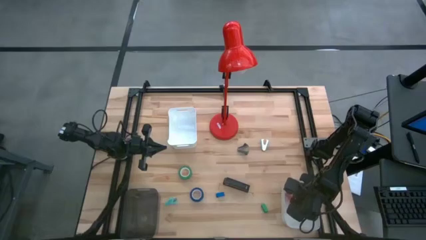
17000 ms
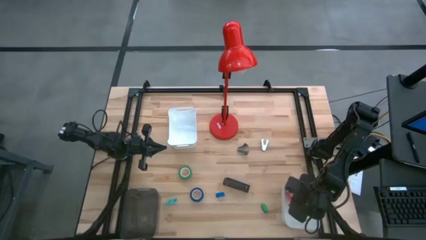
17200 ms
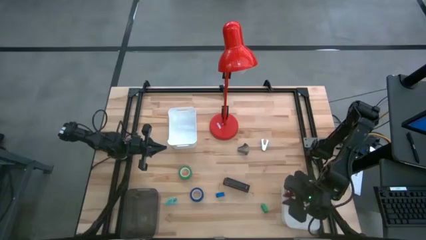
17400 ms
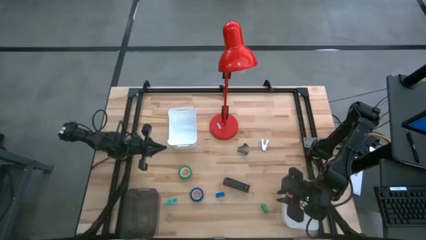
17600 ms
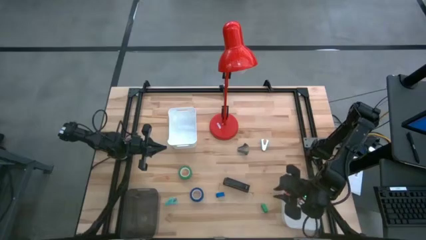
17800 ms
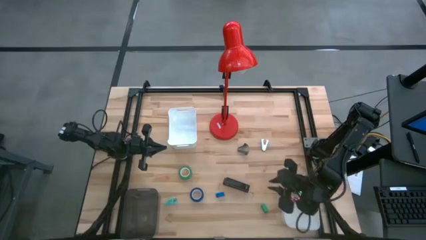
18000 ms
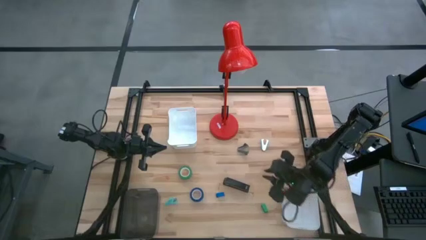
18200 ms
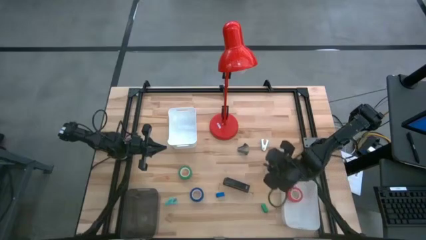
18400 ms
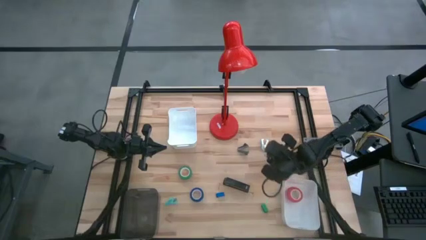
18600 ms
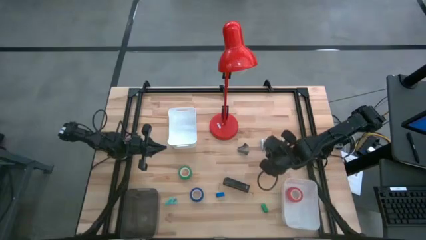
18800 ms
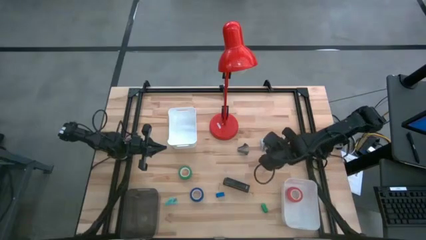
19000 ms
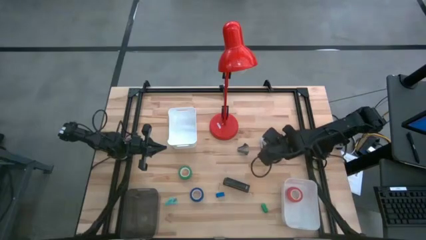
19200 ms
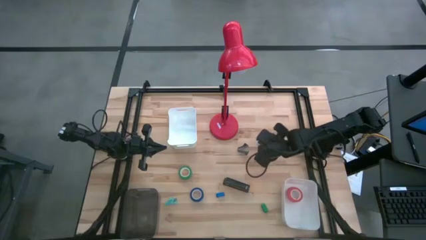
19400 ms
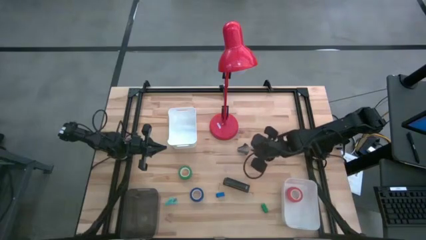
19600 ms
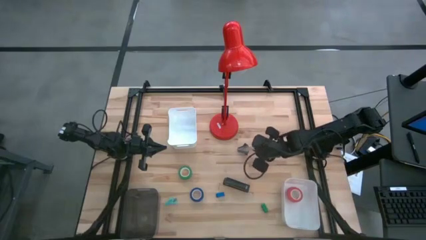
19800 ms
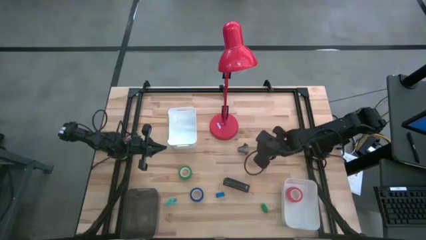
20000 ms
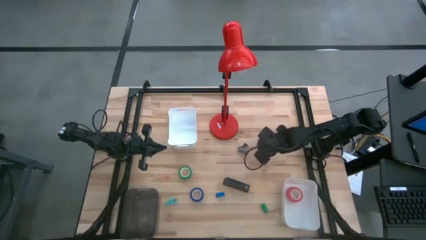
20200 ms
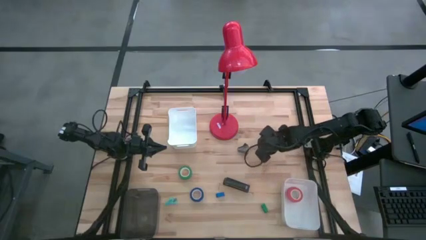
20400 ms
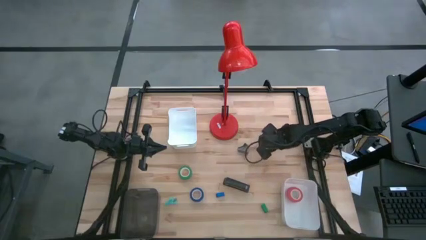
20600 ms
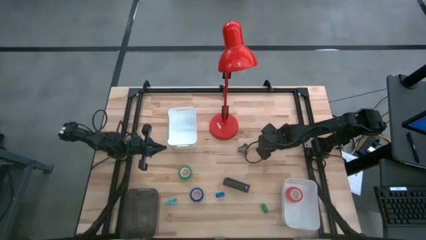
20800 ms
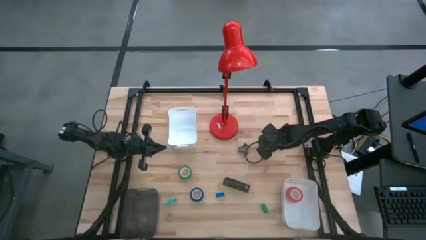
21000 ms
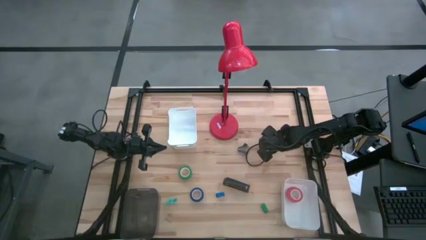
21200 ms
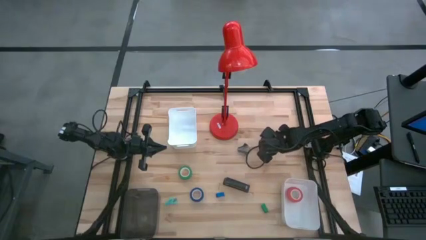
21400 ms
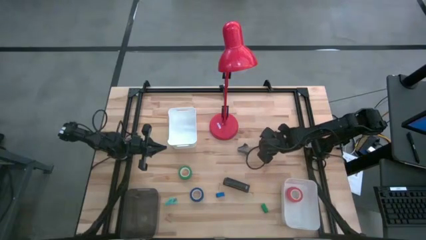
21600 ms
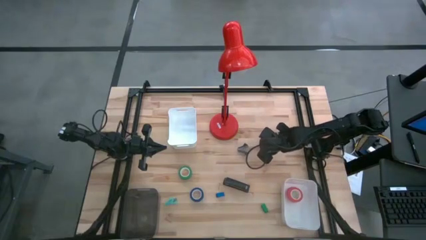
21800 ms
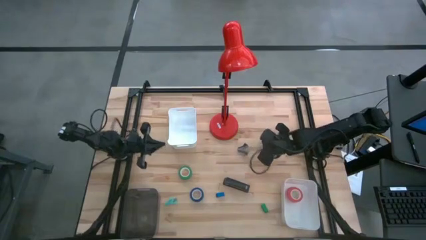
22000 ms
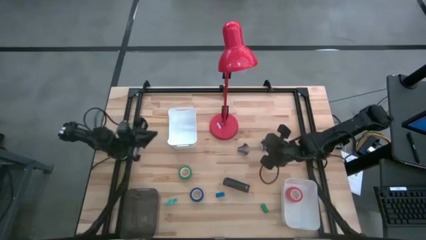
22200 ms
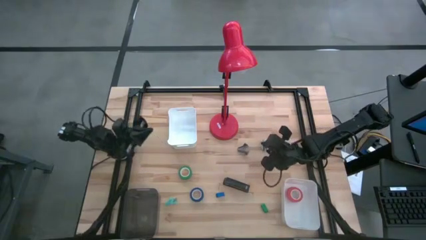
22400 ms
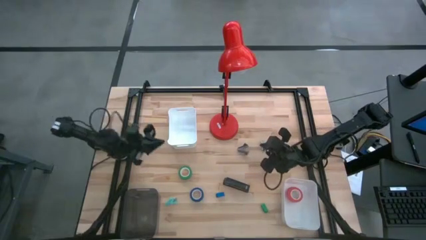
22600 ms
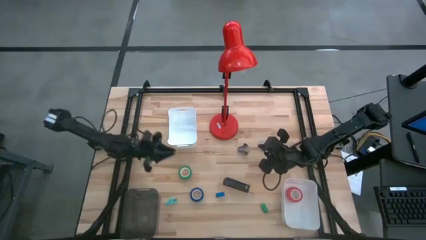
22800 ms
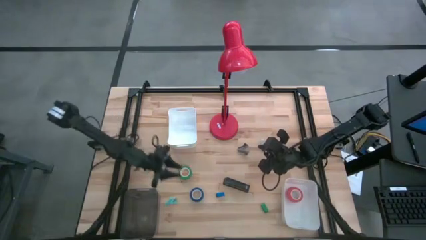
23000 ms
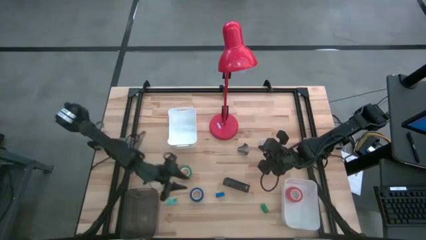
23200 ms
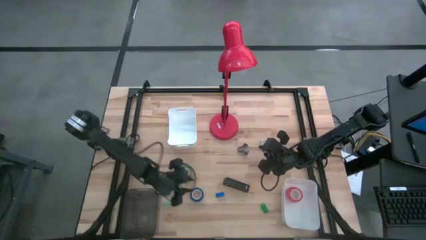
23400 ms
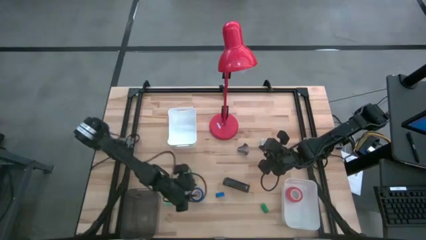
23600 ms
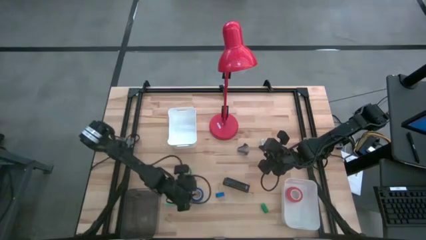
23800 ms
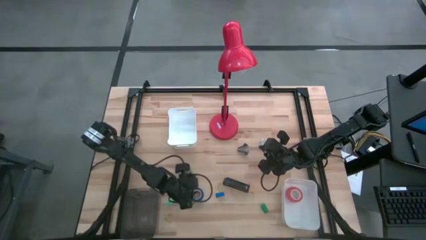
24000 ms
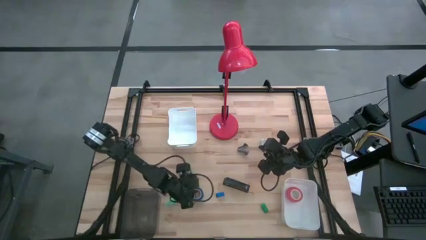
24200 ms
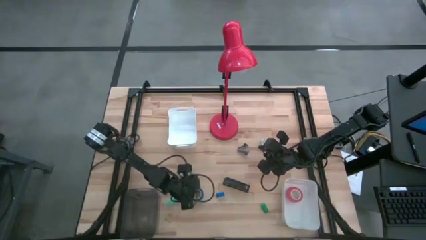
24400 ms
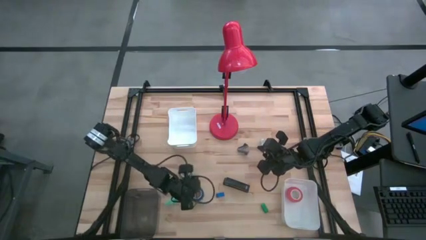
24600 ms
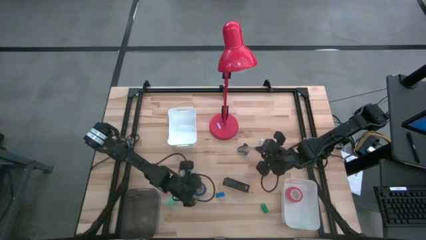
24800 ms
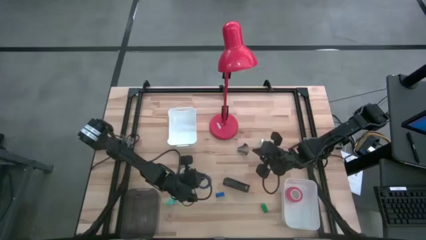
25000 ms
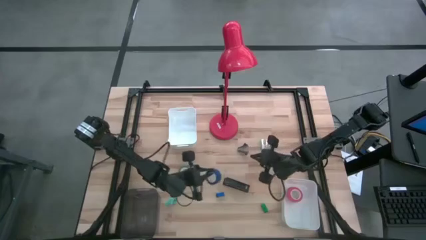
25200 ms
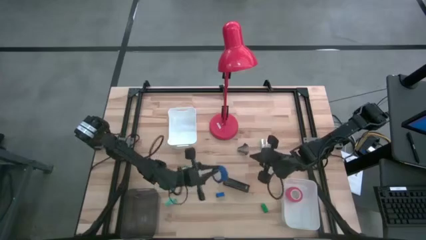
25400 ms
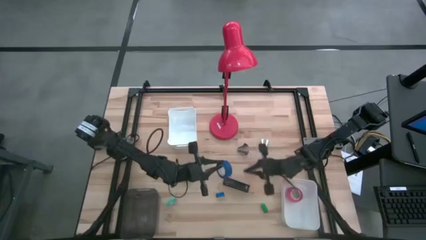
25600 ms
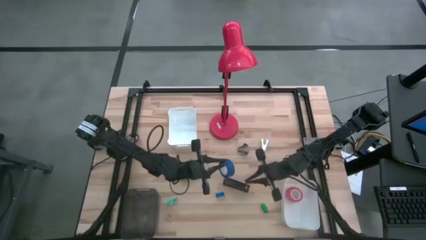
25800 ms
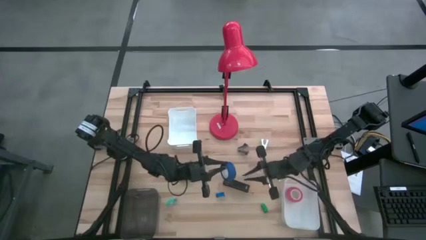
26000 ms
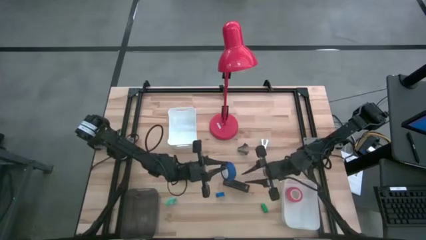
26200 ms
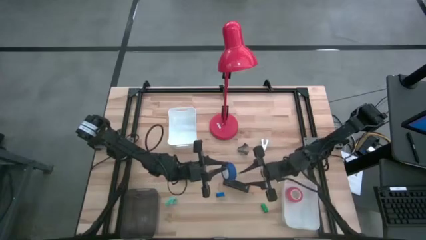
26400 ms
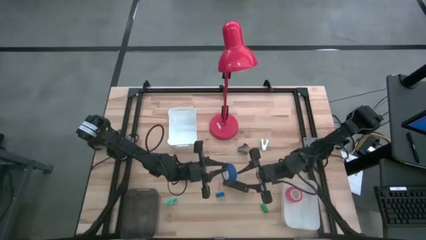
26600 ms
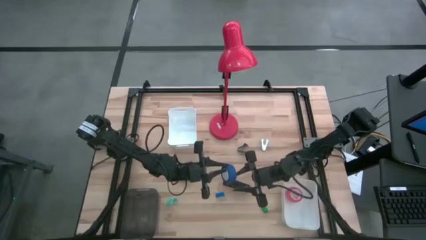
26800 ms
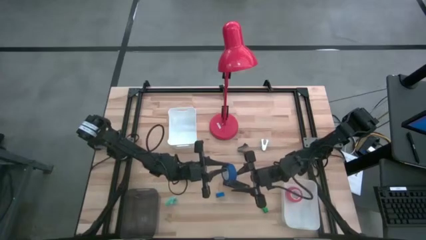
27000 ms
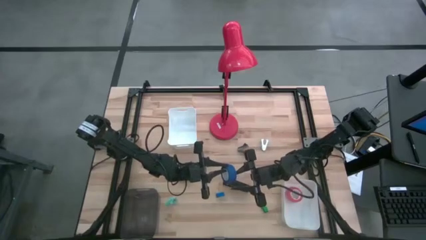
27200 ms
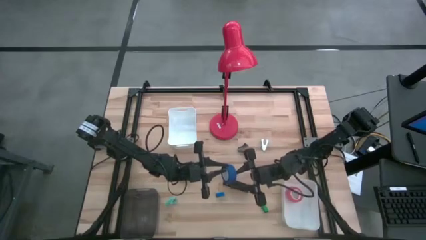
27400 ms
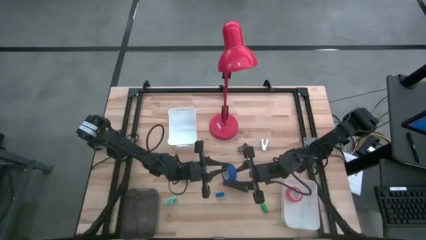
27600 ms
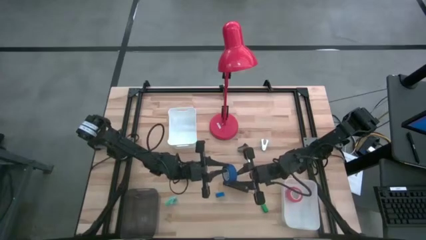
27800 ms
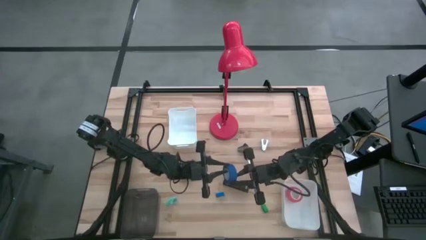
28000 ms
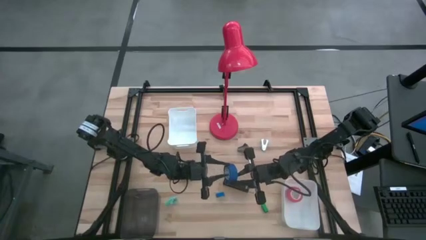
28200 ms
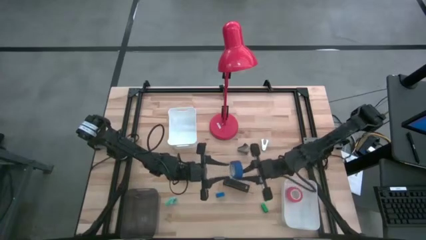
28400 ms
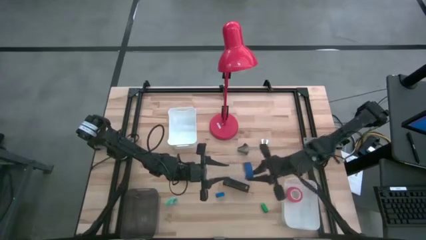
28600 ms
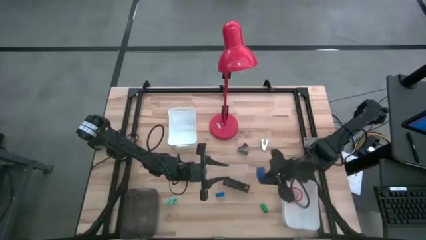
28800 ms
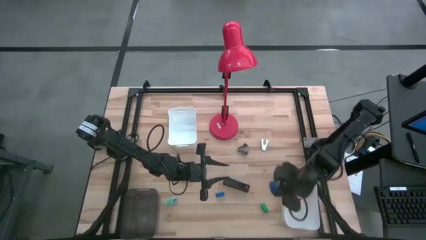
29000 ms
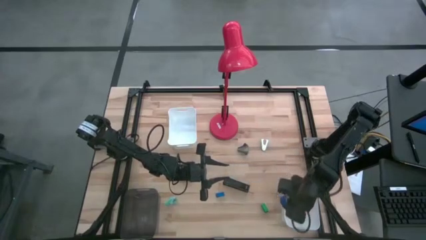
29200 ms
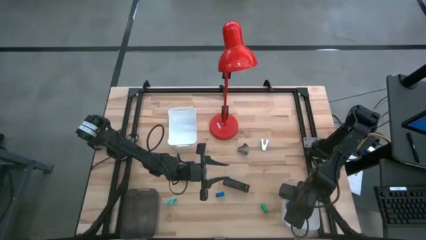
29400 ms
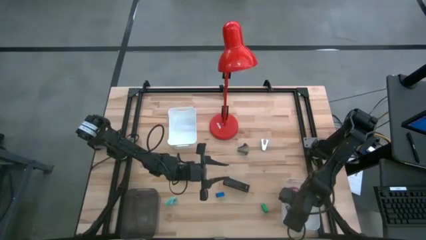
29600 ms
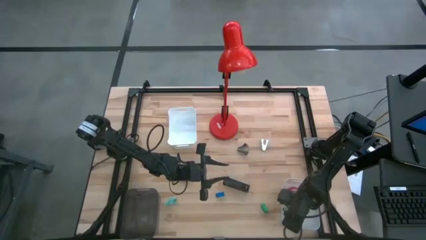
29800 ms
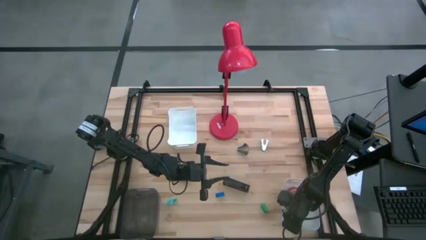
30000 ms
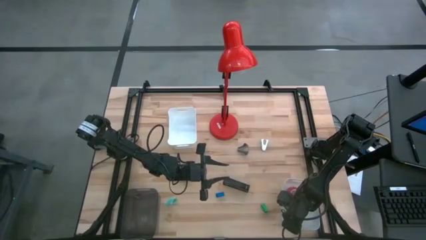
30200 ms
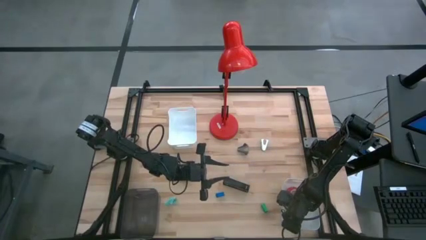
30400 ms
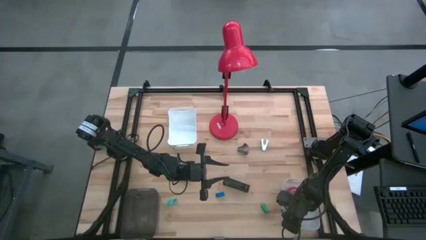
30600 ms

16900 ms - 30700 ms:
Task: Pick and place Stapler, Stapler remover, tape
Put the blue tape into the bottom white bin
